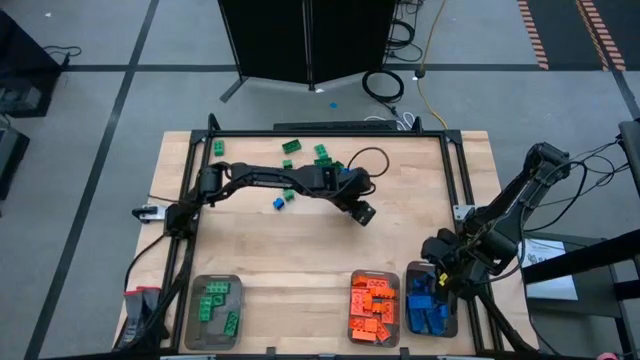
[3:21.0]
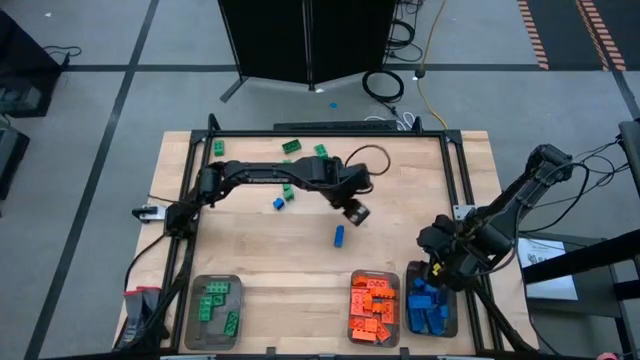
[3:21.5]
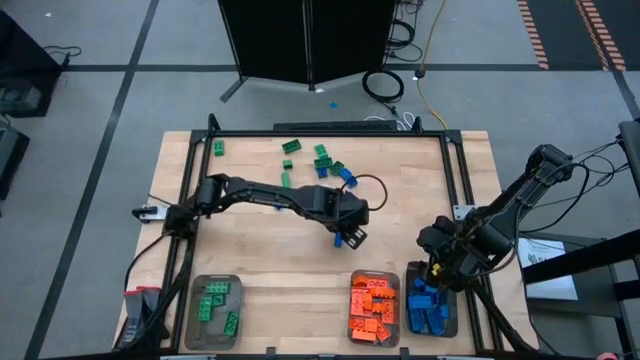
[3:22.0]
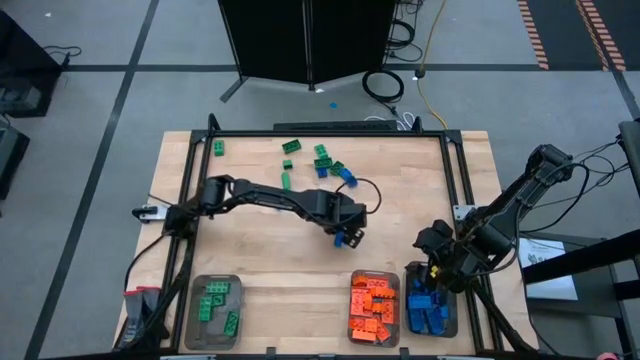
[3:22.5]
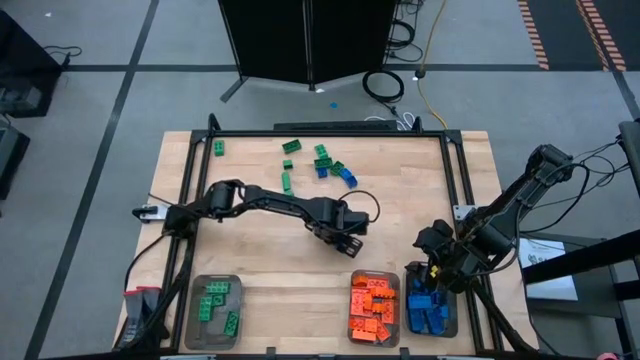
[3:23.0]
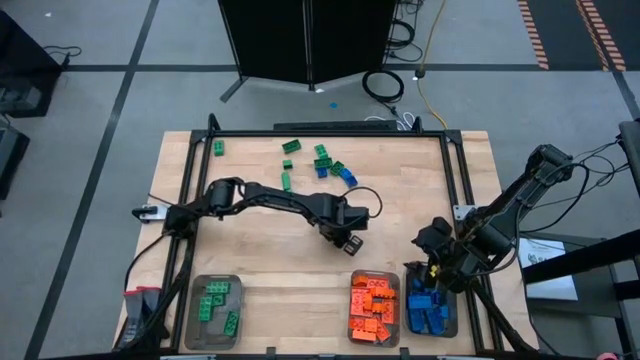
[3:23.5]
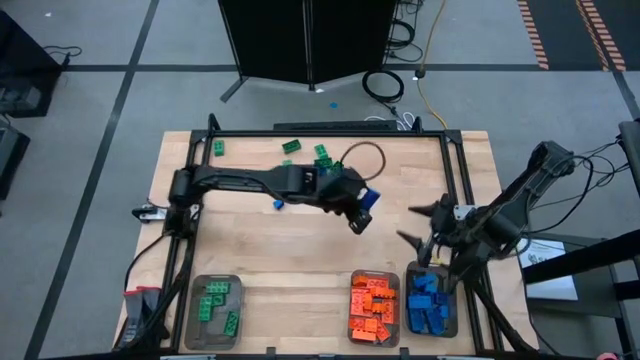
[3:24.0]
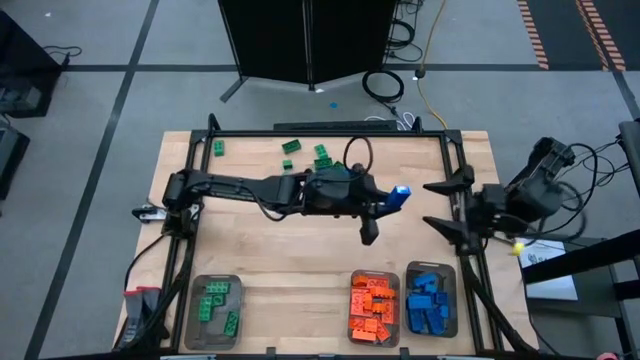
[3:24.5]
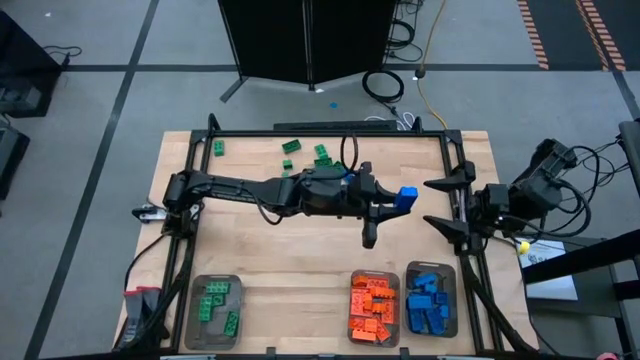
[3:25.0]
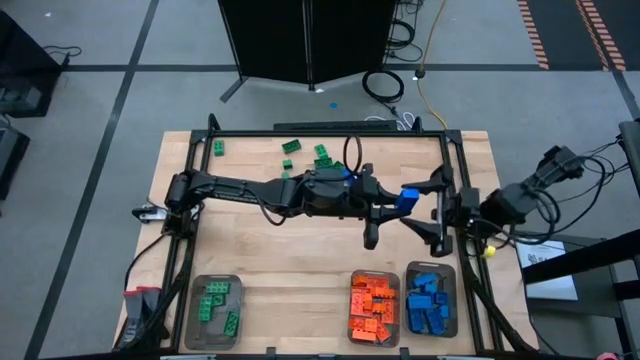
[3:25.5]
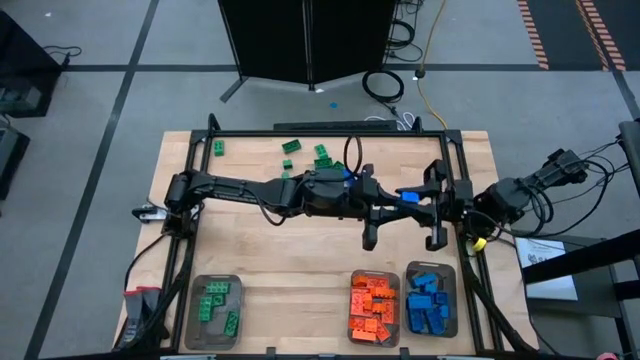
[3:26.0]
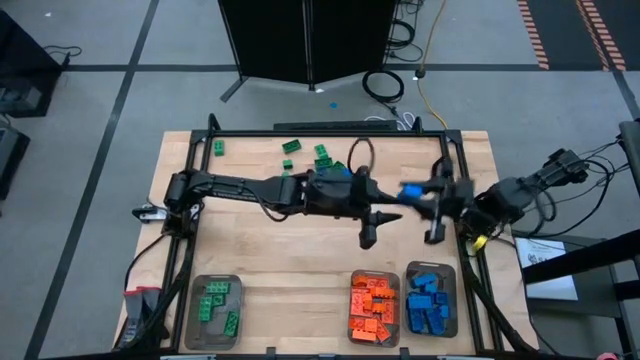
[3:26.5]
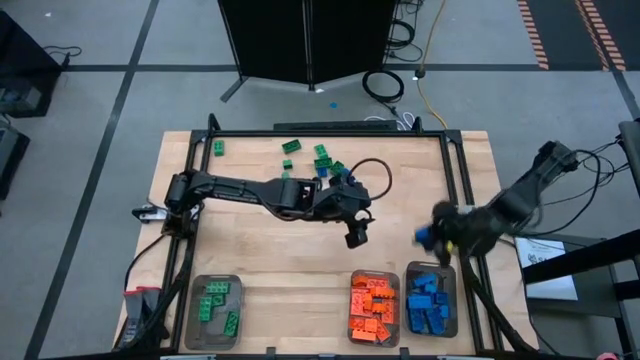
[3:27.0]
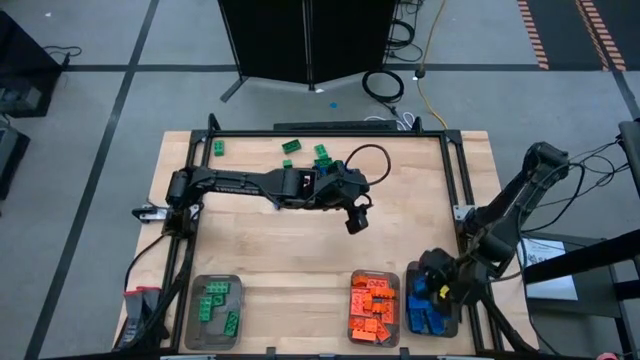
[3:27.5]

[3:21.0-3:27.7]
Task: Sort blocks
Put the blue game piece into the right black bin

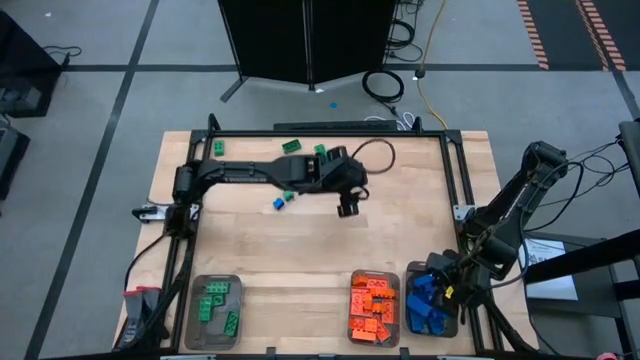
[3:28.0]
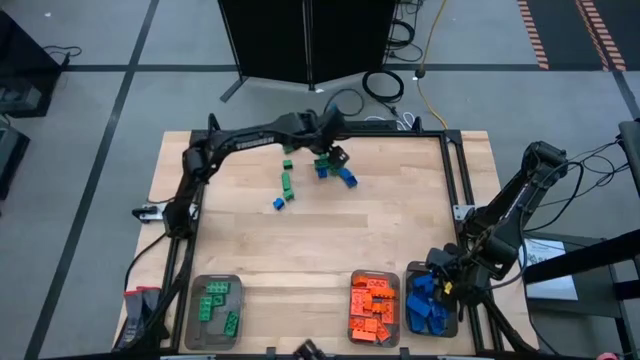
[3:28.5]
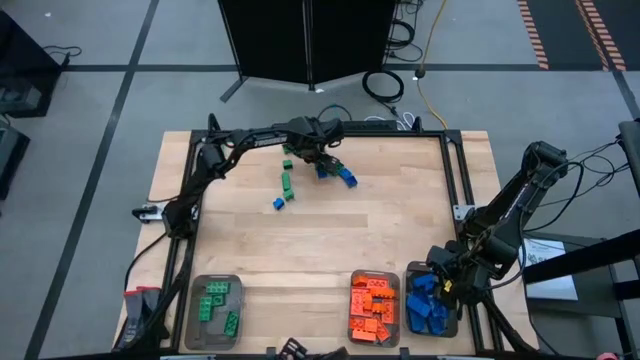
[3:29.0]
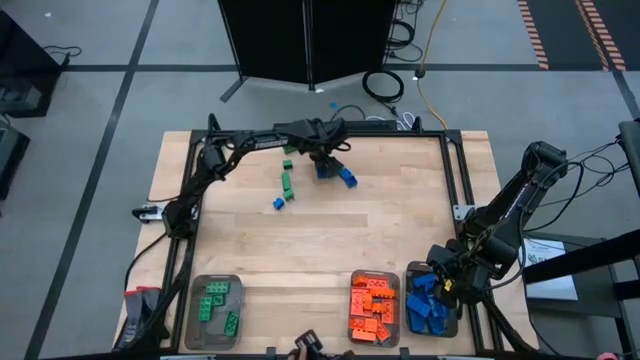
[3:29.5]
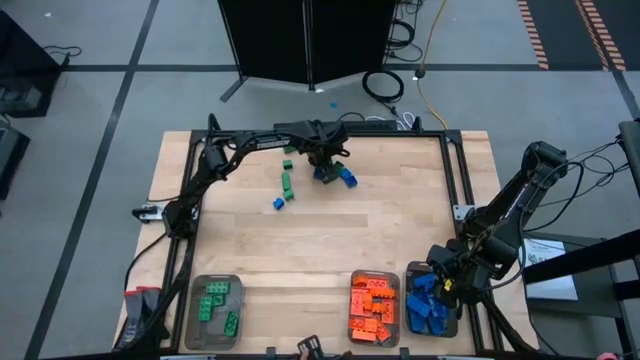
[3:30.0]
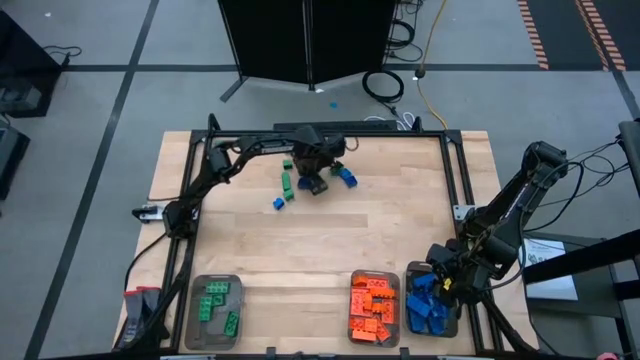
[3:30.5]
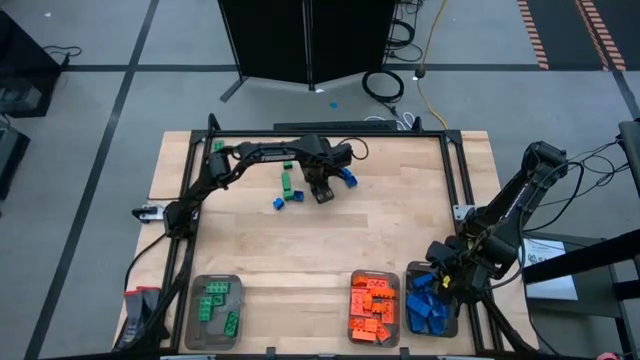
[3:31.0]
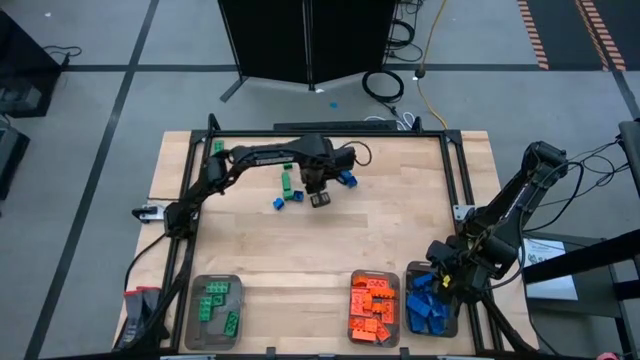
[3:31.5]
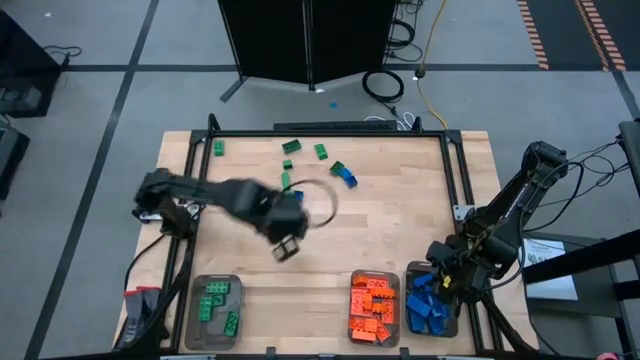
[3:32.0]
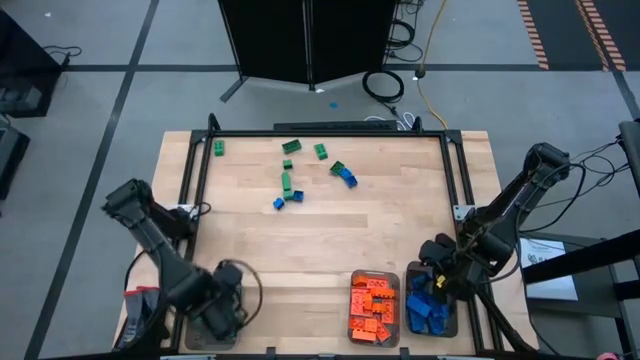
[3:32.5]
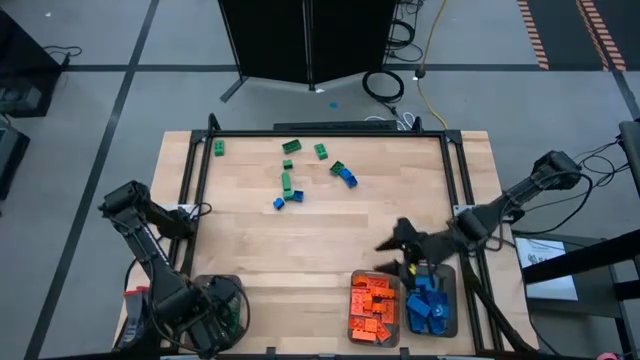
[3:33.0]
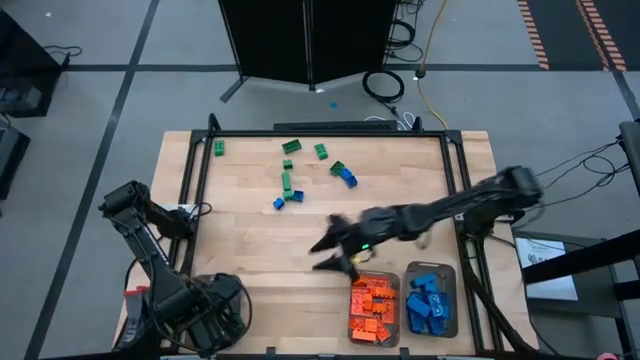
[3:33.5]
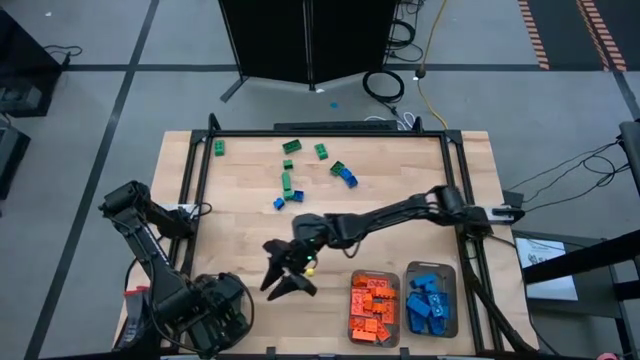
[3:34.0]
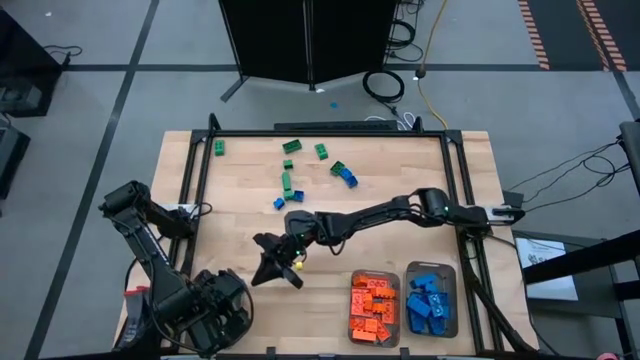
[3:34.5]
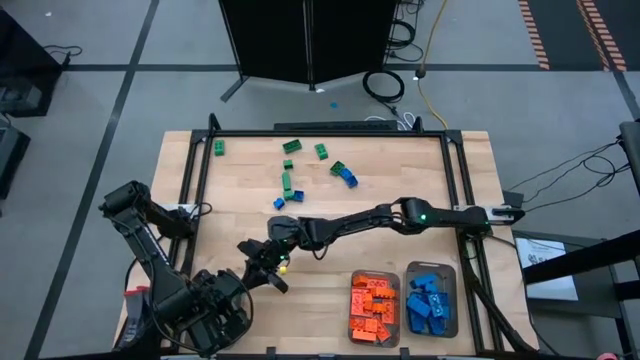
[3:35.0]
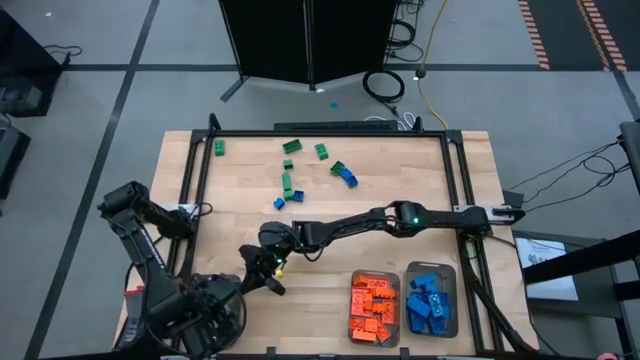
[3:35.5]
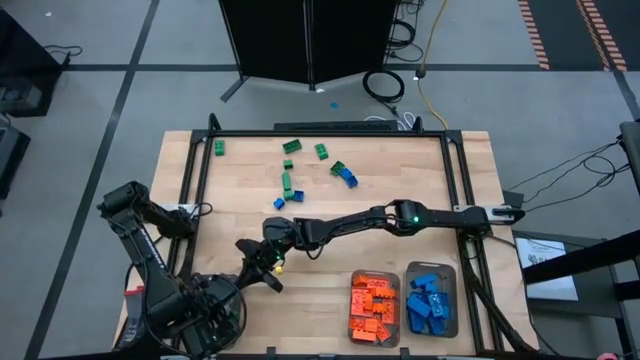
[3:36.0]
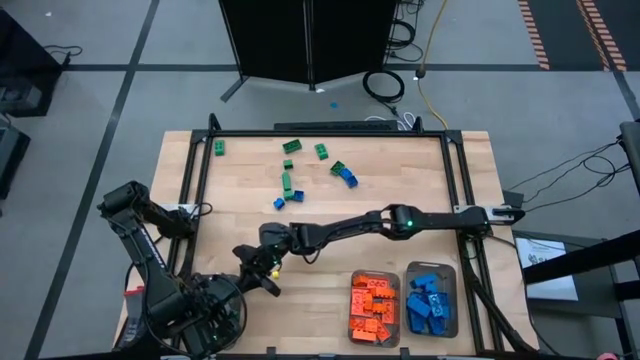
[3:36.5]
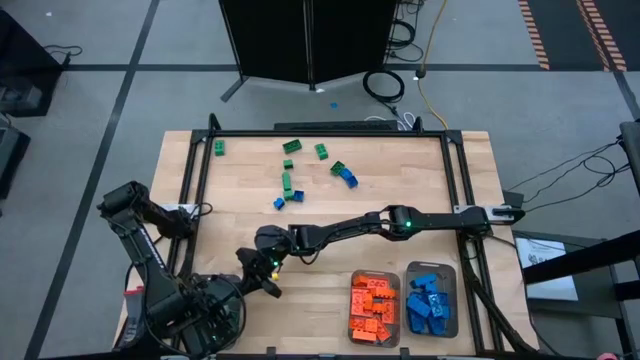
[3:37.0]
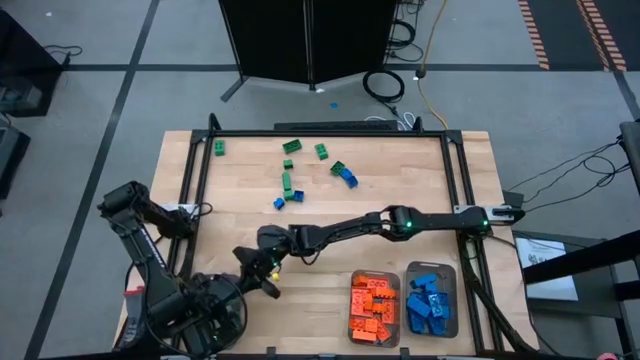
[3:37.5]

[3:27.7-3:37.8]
Put the green game piece into the left black bin
